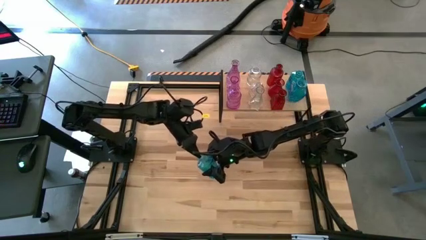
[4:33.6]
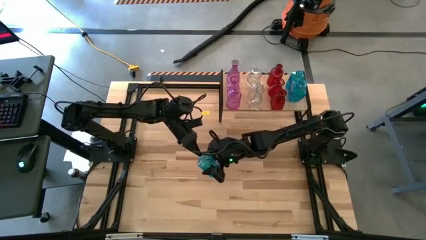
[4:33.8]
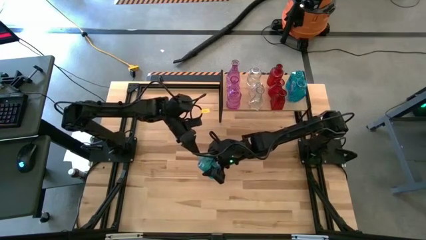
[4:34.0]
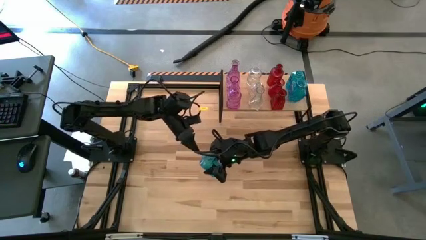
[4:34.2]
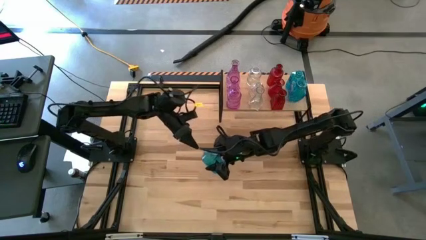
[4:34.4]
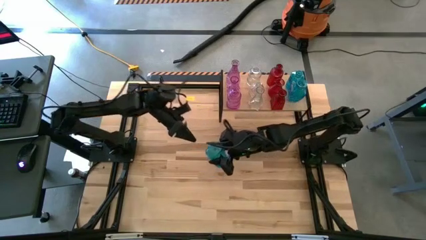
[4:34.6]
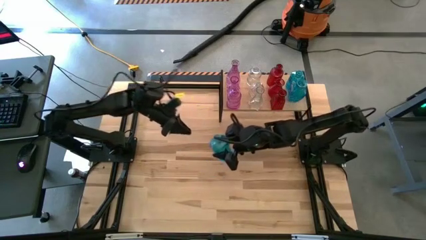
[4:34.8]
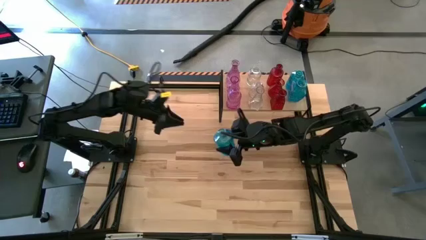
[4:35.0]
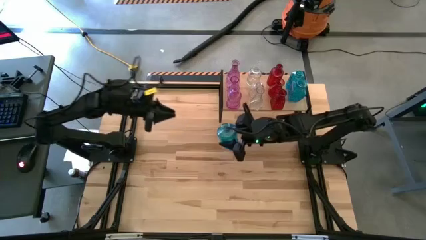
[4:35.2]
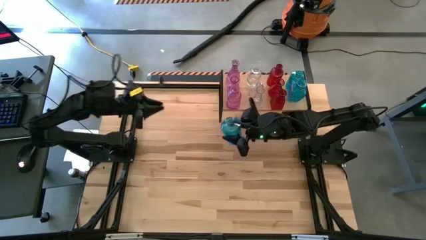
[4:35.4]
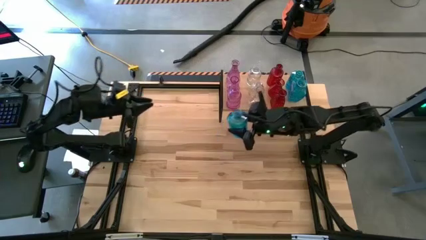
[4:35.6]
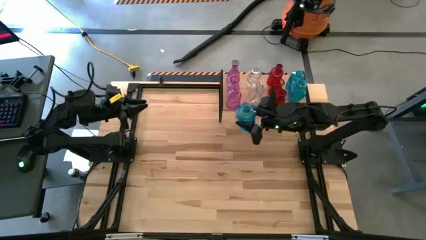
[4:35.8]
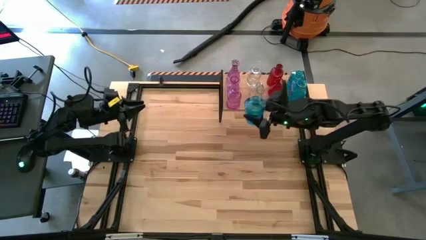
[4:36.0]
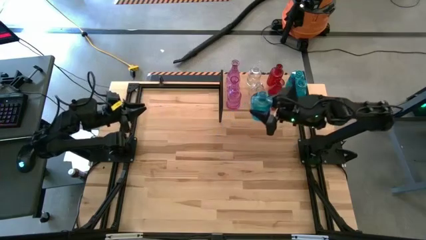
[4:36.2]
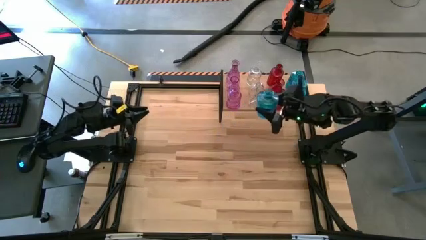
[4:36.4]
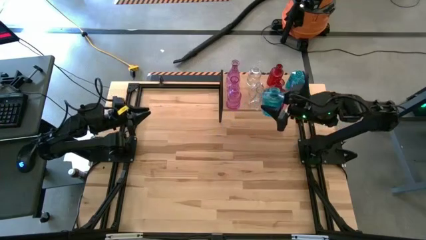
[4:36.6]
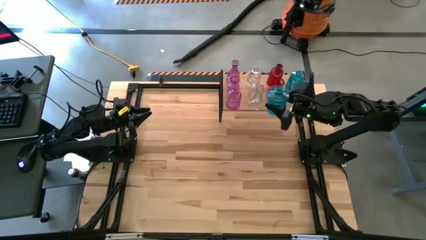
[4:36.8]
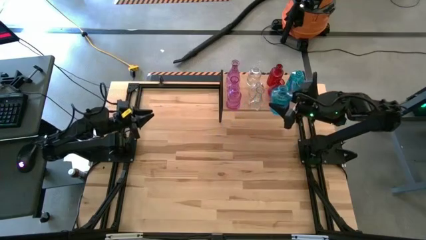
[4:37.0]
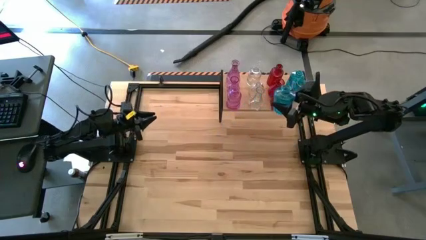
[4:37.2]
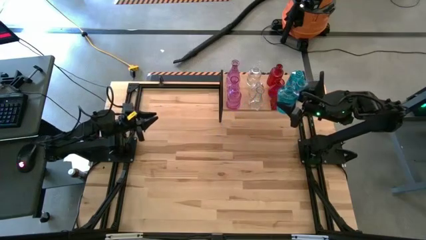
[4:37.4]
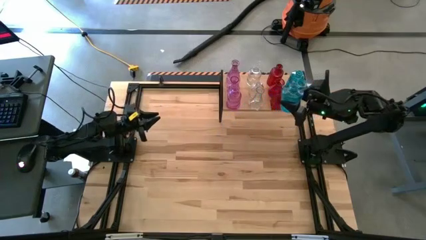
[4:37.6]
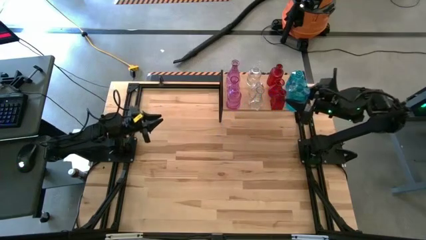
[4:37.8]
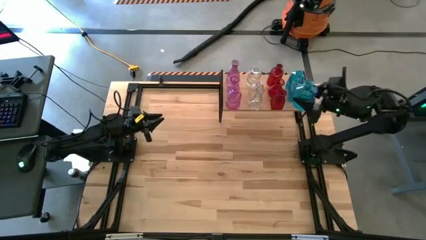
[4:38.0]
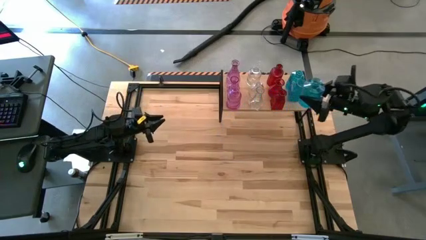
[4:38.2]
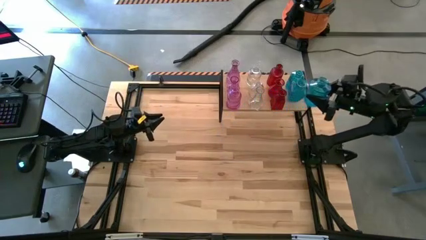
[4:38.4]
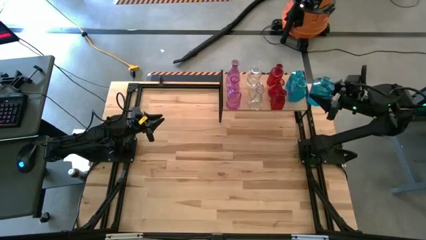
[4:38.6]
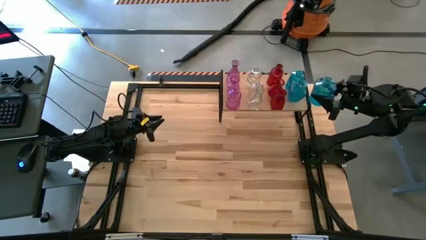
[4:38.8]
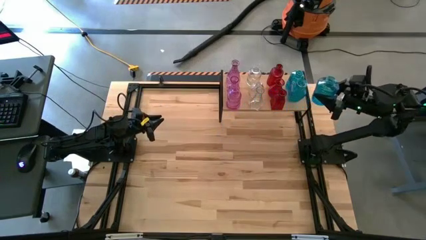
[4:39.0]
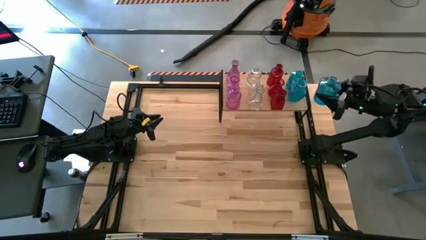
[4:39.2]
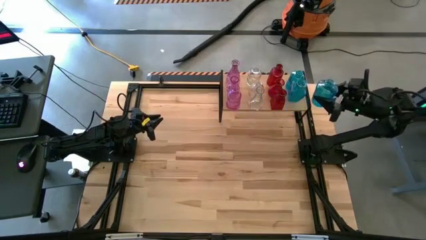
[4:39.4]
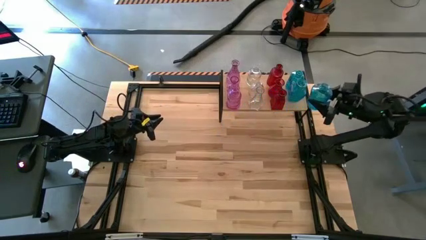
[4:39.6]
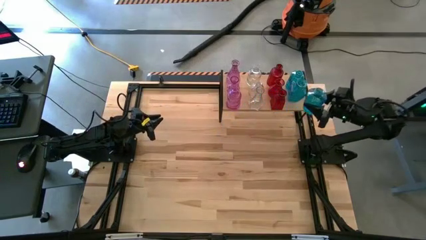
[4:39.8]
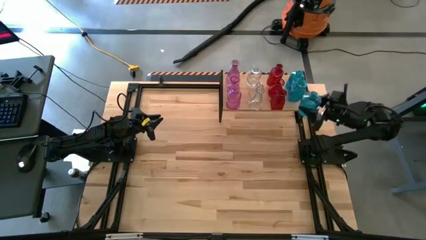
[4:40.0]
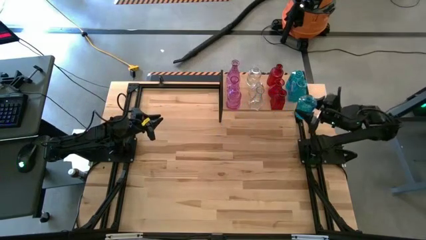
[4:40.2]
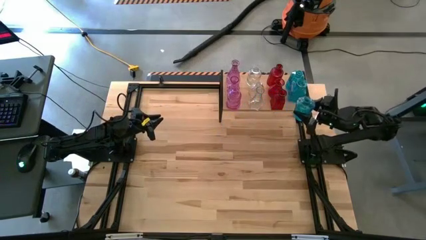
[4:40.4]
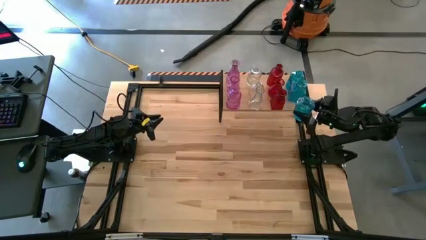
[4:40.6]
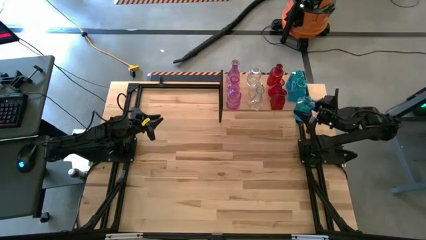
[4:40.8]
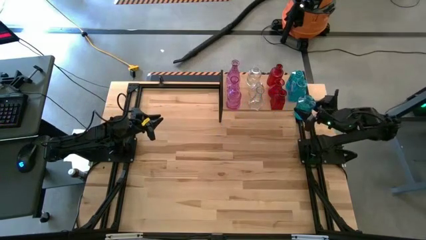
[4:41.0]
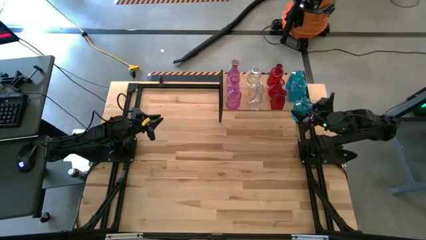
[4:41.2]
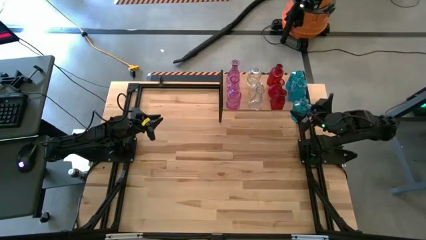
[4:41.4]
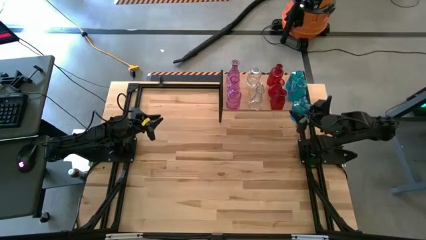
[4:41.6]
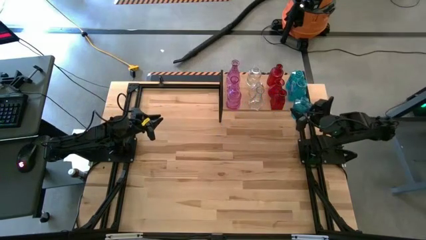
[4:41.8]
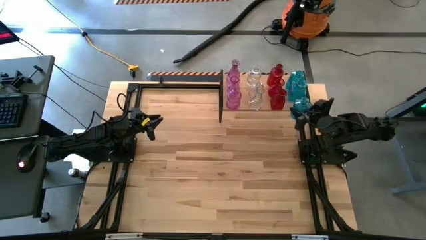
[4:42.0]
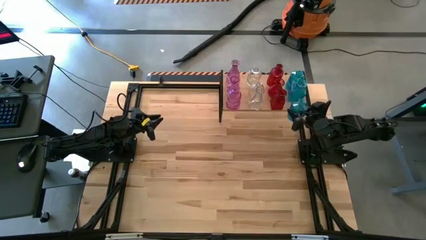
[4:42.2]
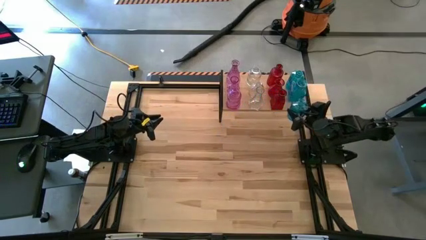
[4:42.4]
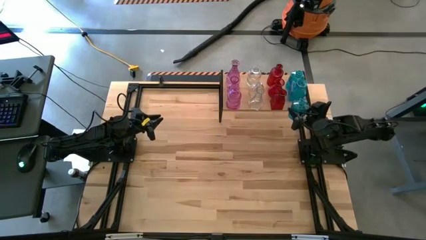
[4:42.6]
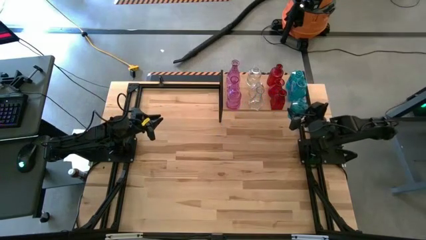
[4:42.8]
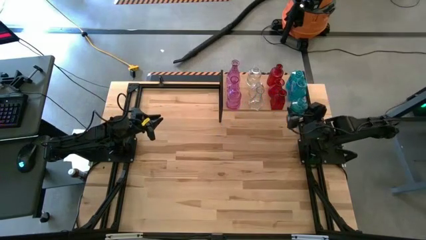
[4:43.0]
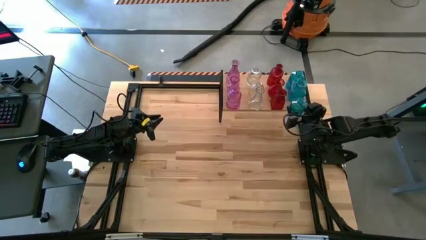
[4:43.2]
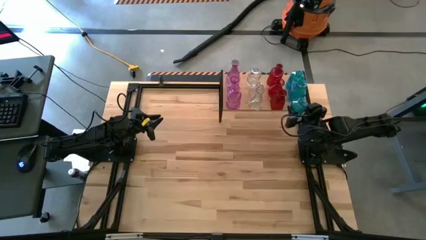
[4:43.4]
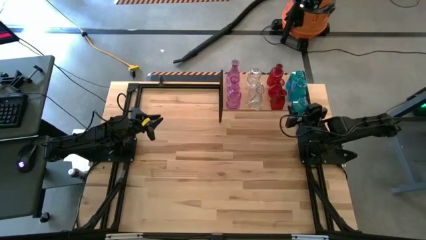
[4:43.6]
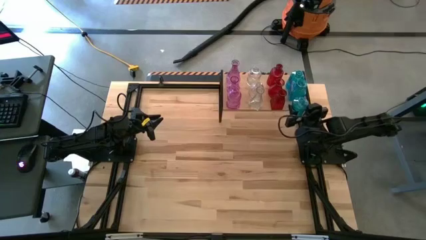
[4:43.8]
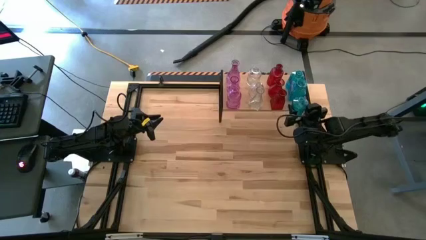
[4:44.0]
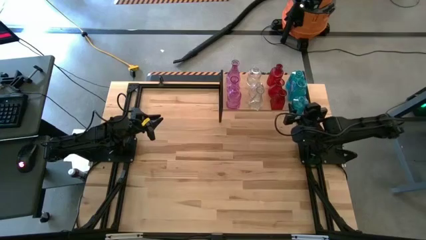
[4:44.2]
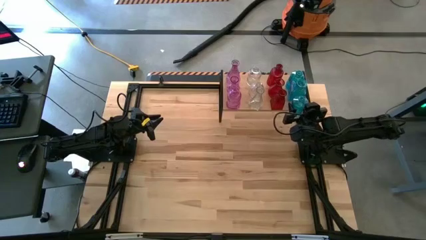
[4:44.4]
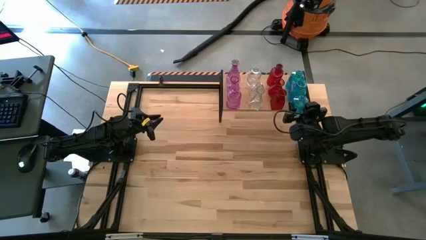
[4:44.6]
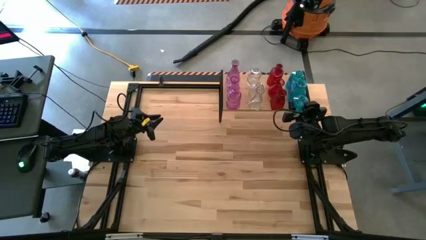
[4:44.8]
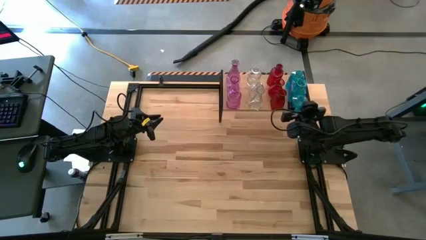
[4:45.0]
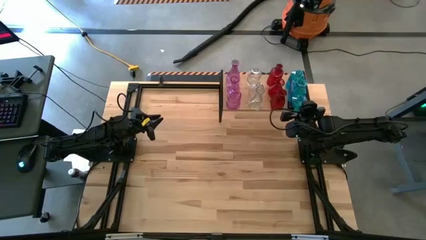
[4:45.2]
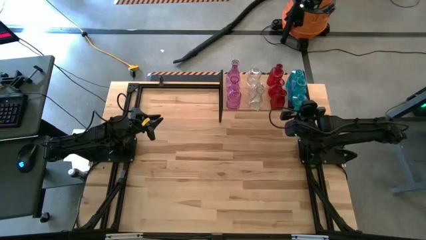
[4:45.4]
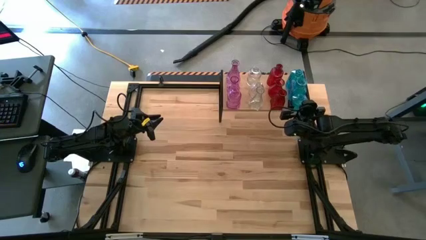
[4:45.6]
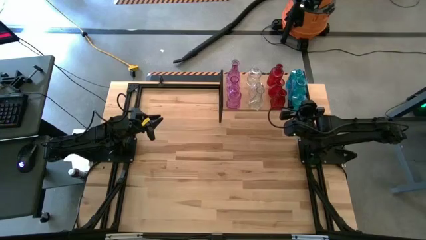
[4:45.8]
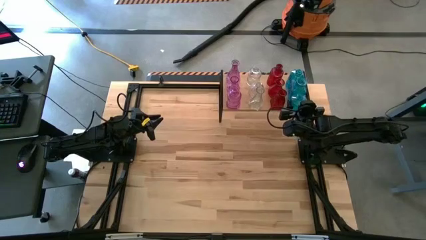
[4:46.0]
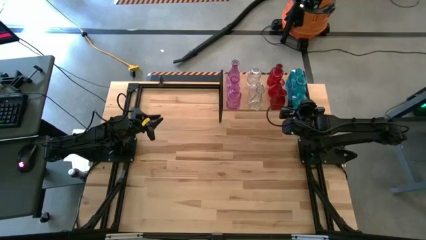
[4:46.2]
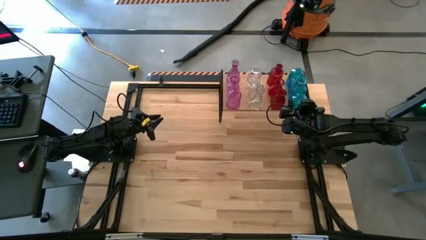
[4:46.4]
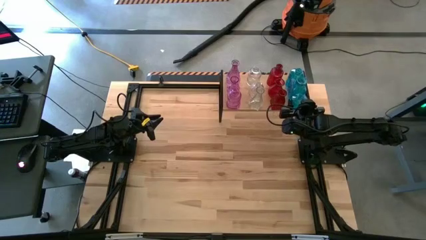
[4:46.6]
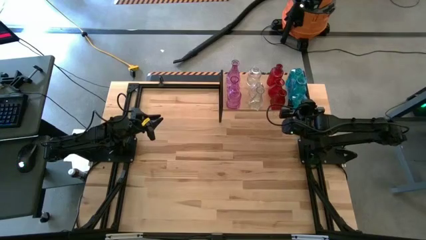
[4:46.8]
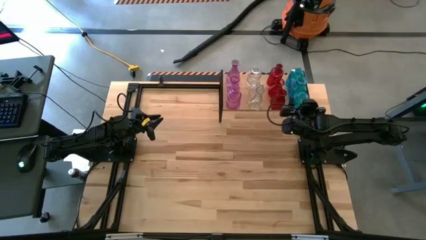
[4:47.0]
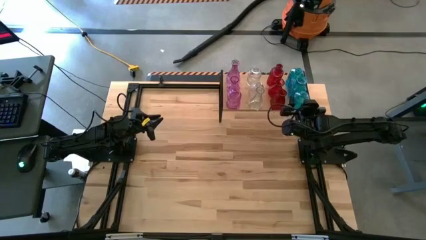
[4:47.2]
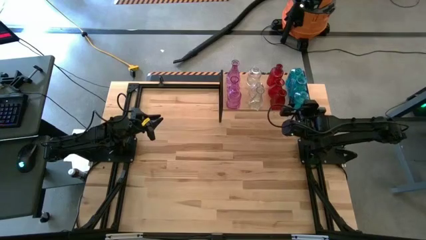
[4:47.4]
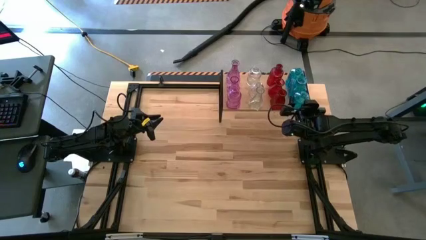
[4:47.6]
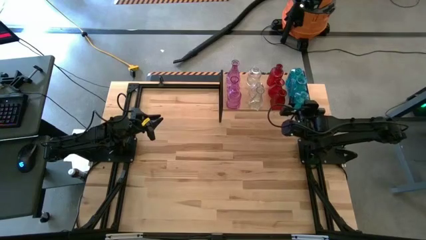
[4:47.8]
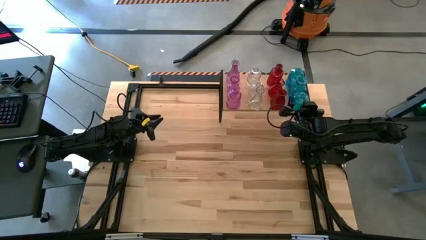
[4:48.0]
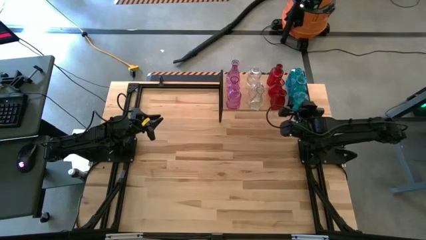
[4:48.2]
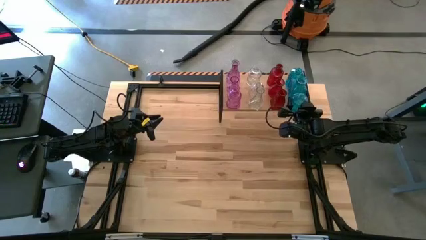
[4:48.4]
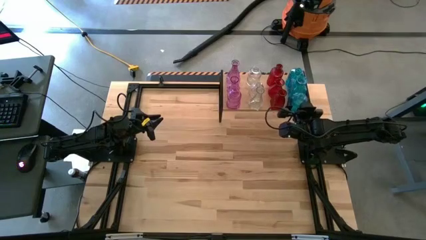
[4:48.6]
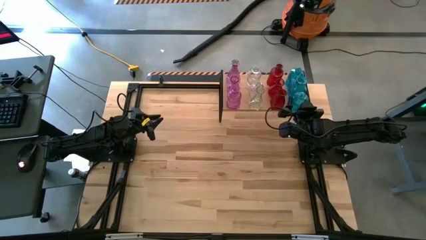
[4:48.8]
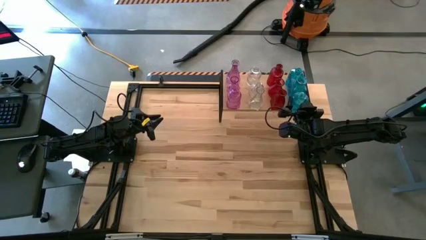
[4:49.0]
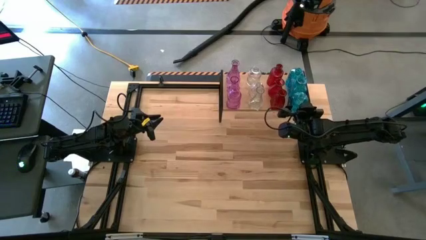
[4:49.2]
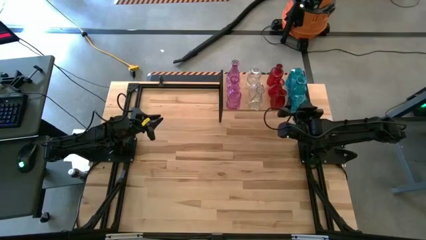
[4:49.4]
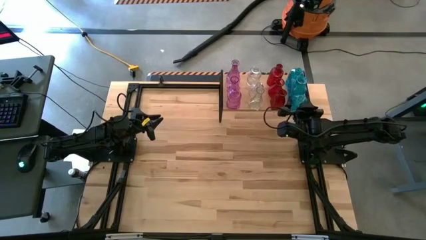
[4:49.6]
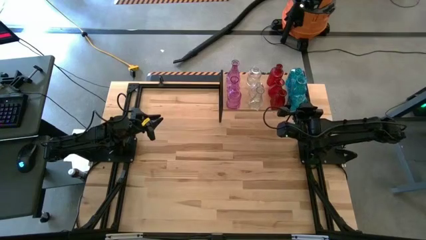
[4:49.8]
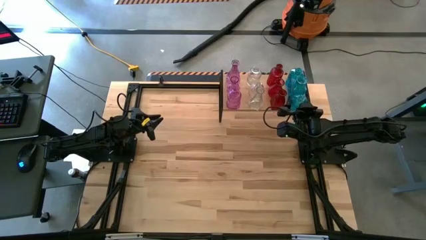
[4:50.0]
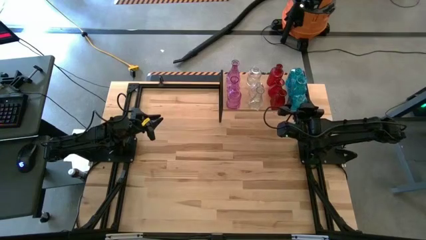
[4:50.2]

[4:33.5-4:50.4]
Task: sort vases onto shelf
Put the blue vase on the shelf aligned with the other blue vase
